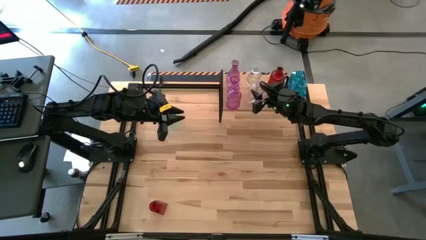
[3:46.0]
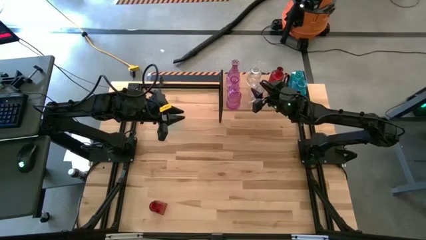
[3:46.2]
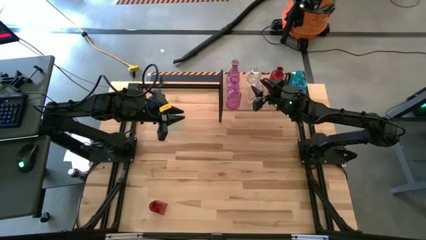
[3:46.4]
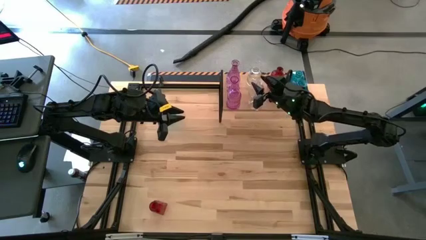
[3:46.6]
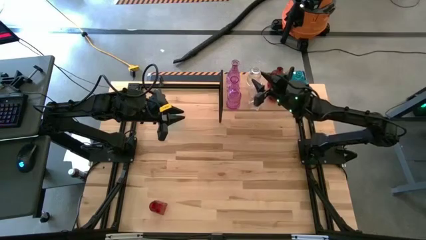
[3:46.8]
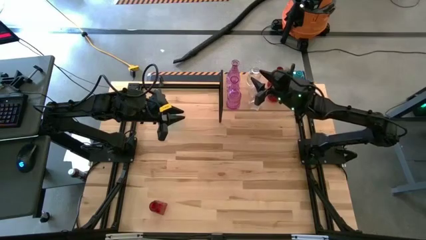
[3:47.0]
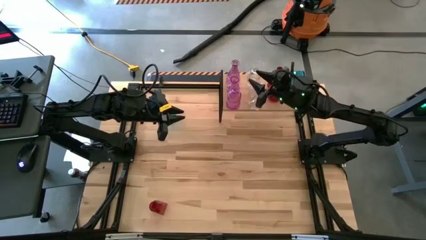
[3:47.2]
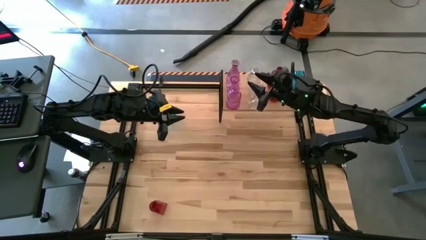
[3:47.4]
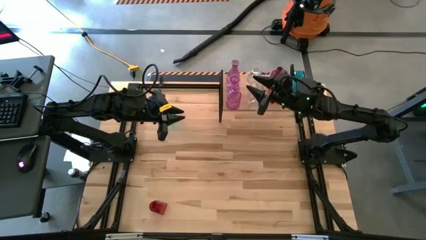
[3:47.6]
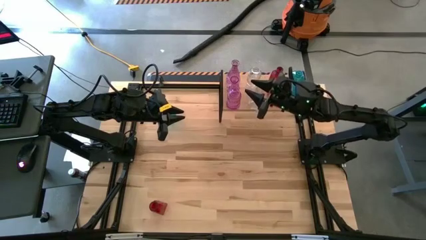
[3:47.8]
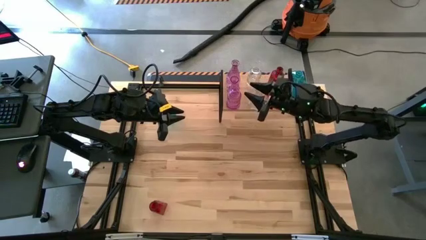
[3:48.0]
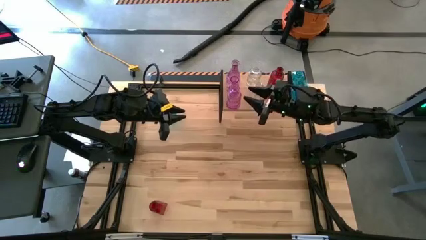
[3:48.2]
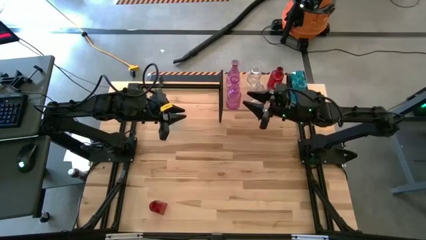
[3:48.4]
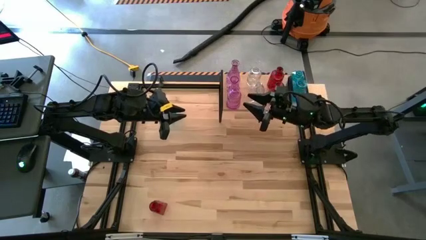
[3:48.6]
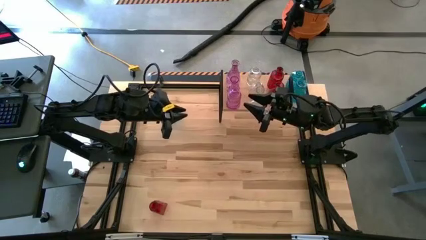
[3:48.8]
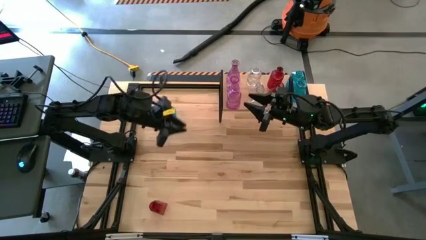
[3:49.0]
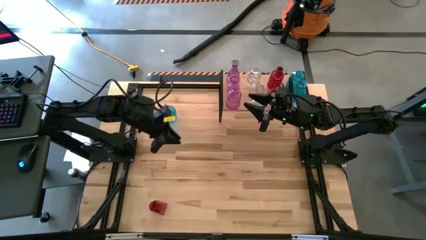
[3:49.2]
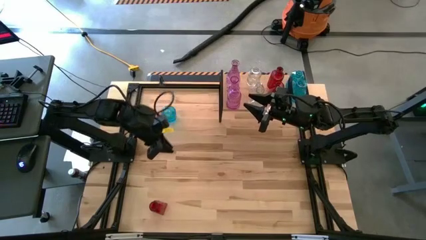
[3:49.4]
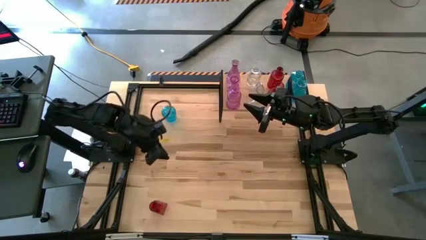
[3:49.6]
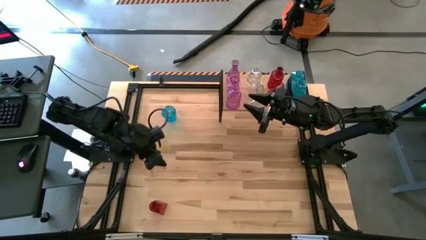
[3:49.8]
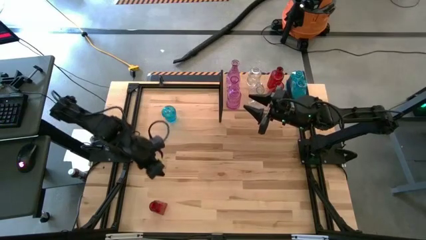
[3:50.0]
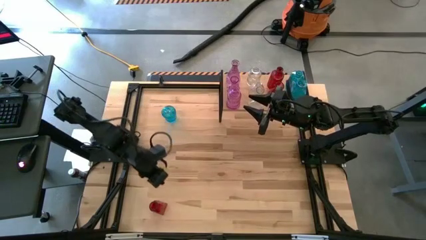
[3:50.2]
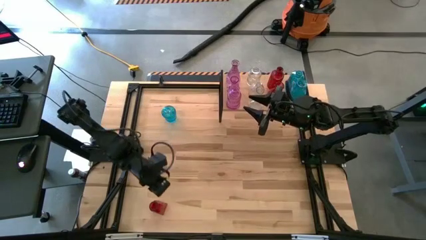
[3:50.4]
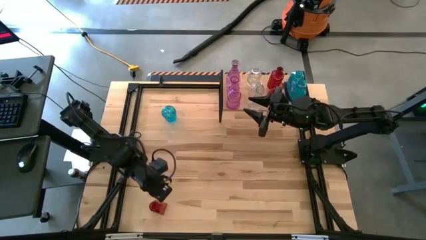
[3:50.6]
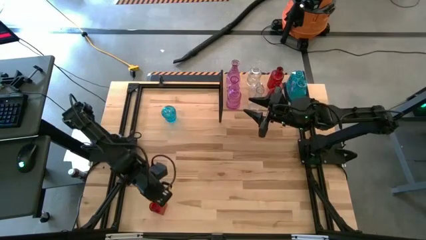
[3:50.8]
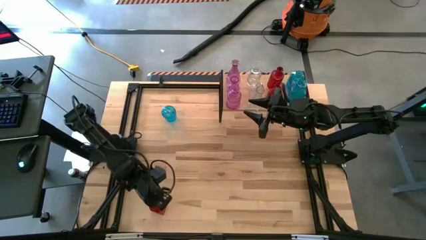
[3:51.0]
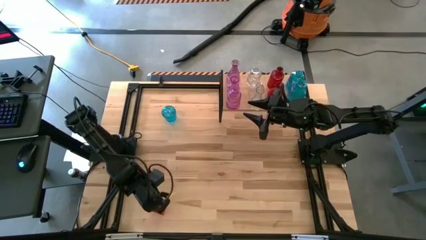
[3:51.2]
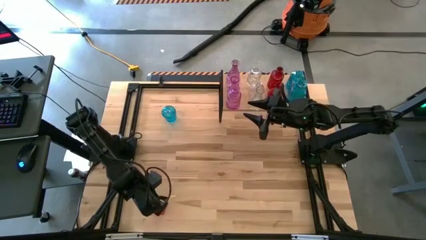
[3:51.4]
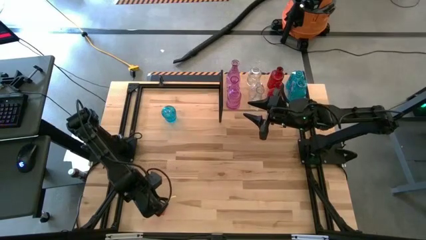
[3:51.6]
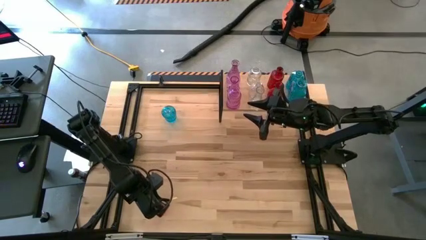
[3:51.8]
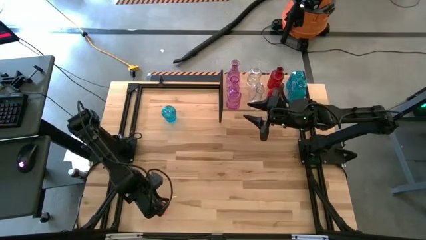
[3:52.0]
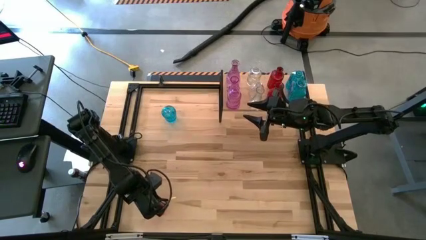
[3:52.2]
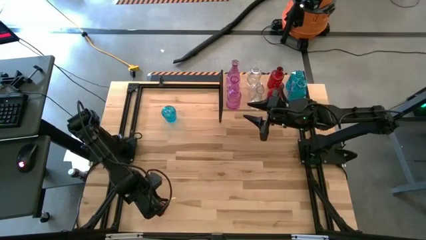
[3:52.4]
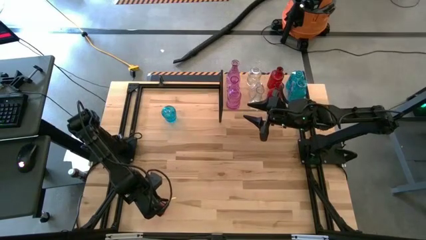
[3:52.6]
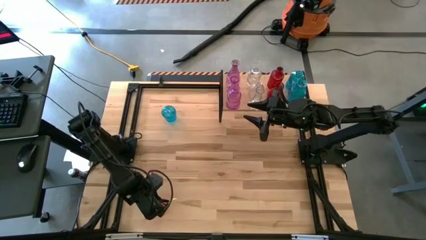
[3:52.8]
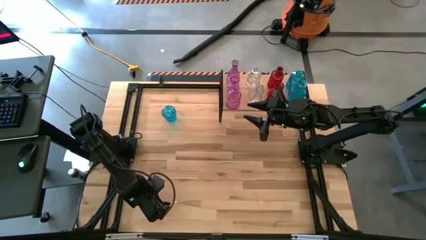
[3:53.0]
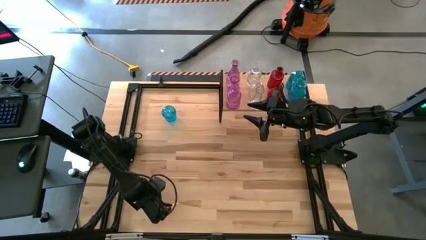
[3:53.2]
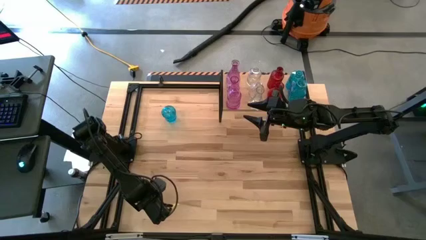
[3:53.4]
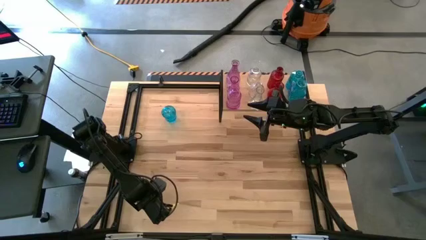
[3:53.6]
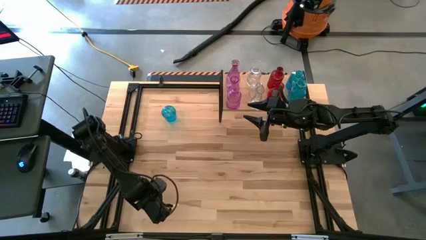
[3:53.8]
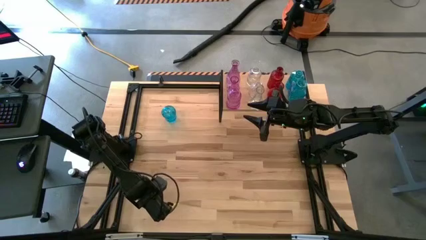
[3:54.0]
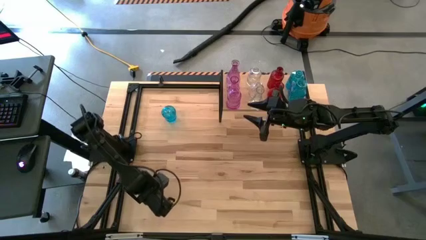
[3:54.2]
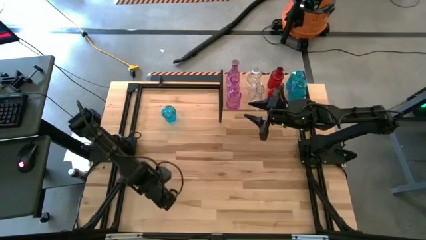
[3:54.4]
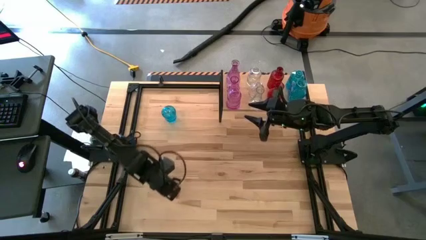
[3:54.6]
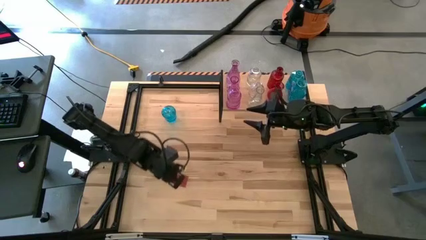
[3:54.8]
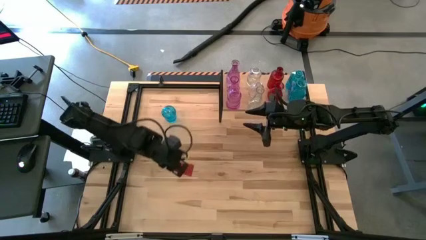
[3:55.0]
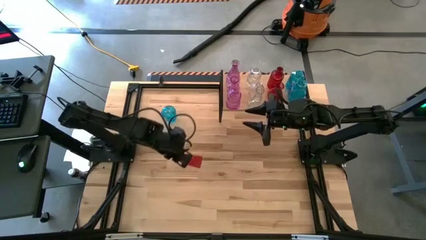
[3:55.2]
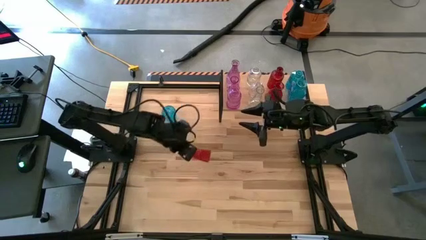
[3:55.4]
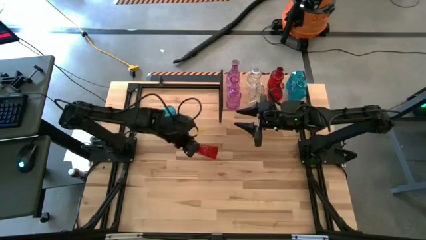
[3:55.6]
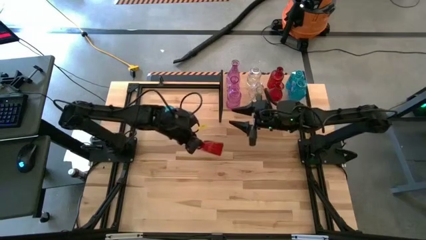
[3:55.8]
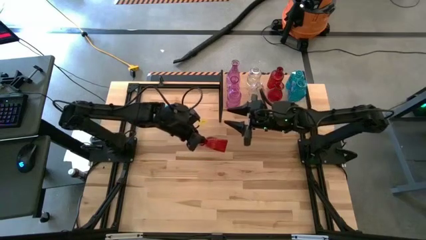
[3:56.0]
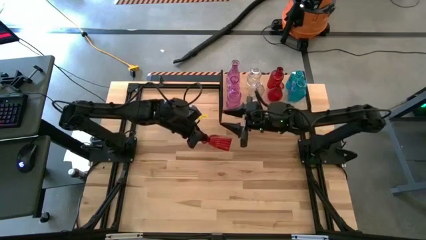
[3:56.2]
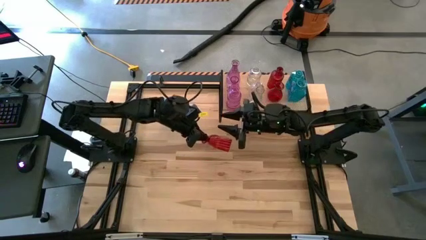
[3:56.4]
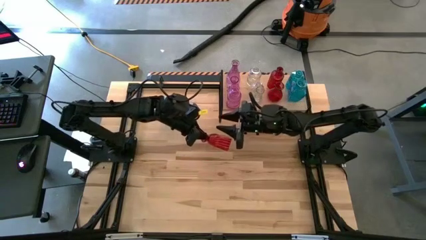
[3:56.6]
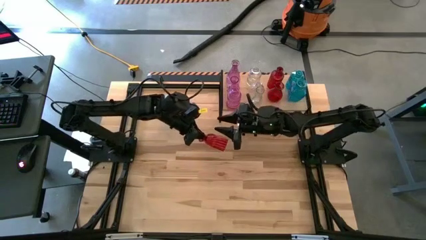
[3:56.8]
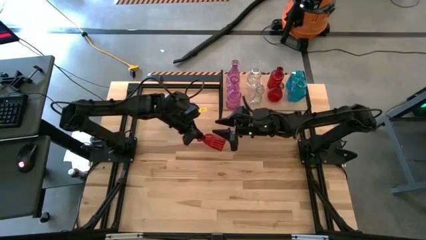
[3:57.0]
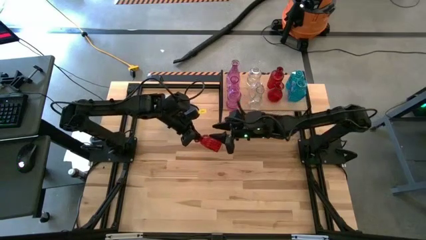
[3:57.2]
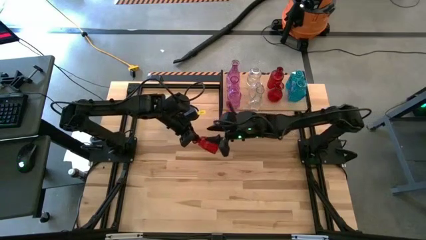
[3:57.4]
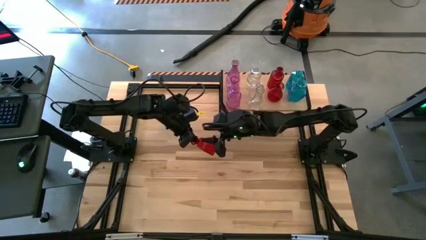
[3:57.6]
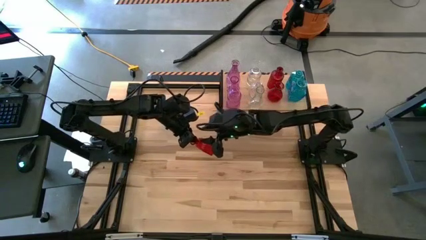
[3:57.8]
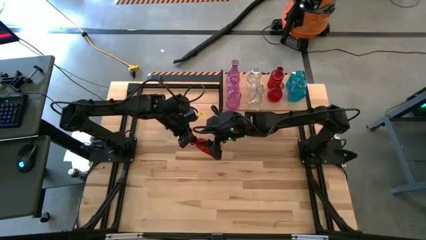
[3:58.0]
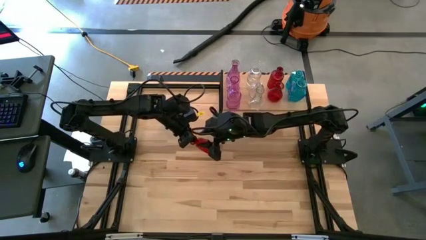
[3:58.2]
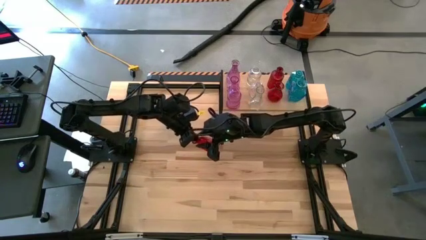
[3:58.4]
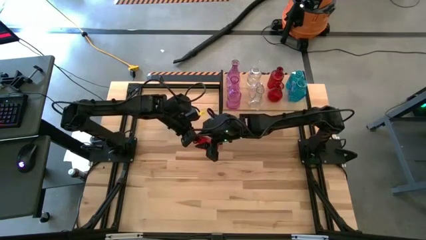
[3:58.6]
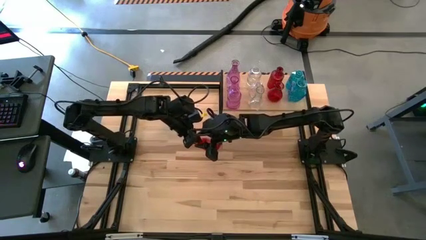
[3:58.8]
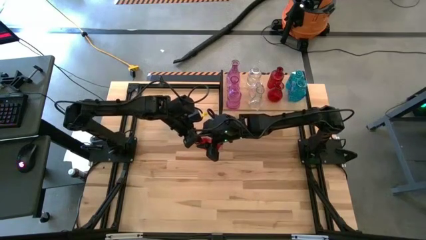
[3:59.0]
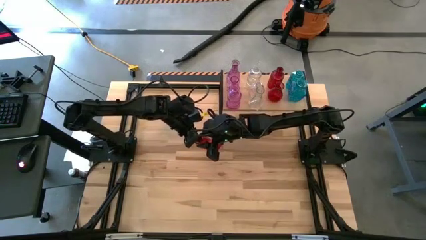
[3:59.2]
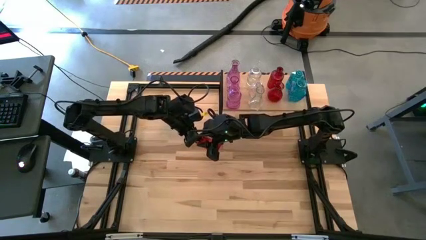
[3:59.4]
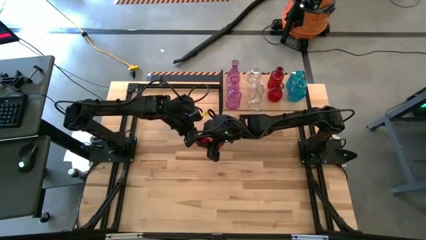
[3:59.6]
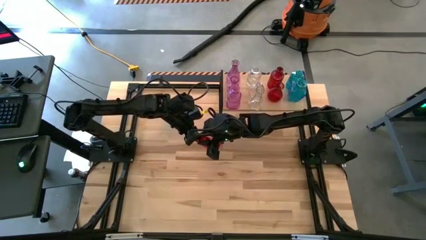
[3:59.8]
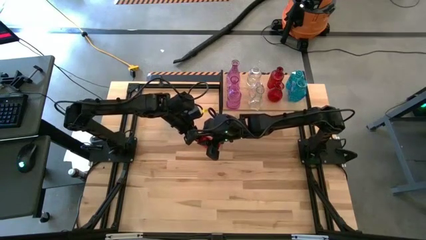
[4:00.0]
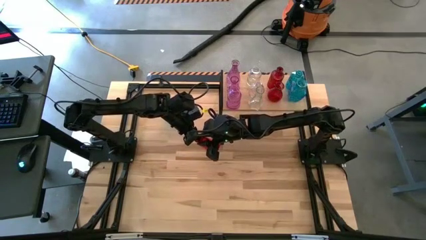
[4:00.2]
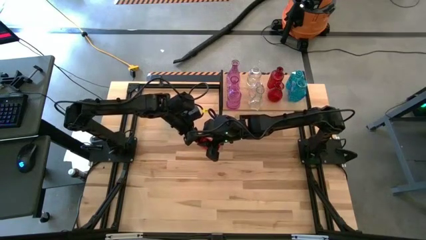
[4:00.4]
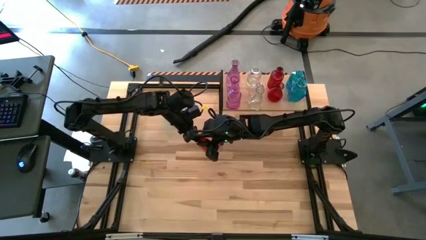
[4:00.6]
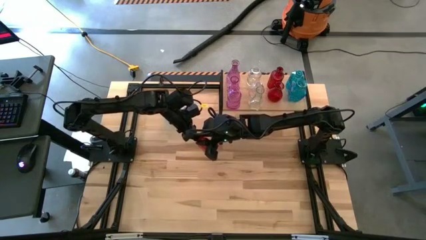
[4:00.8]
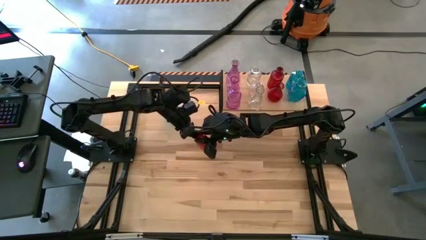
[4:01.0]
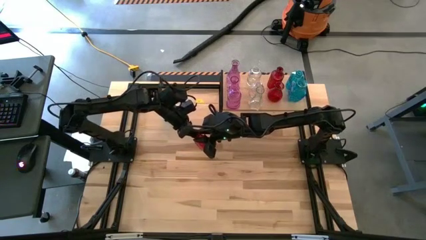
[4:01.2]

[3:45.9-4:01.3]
Task: sort vases onto shelf
Put the red vase on the shelf aligned with the other red vase
